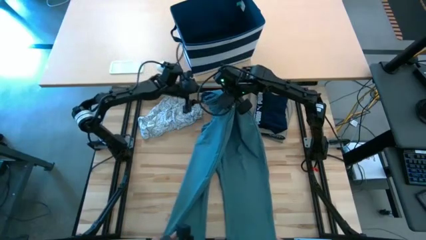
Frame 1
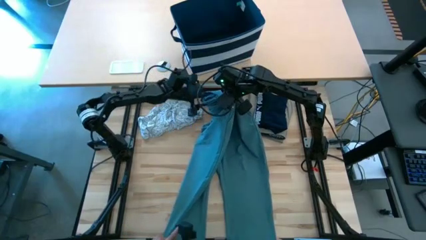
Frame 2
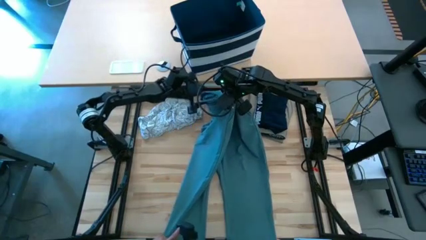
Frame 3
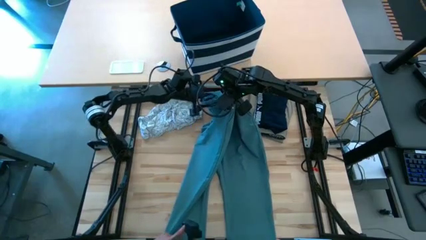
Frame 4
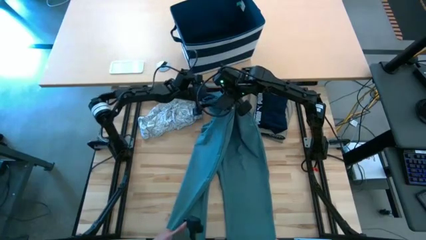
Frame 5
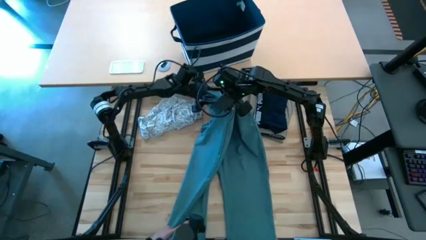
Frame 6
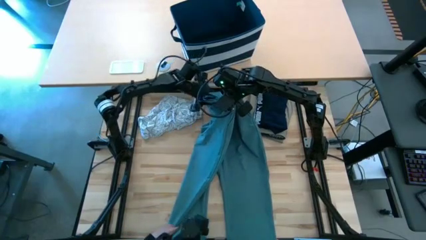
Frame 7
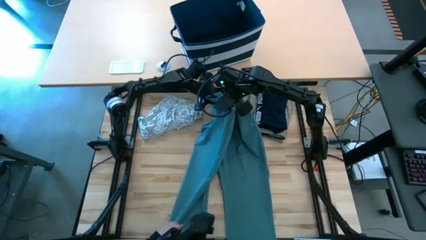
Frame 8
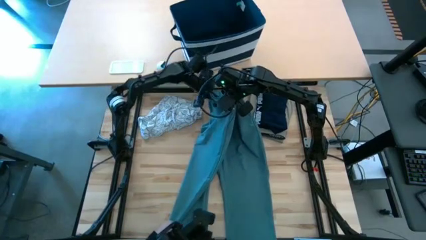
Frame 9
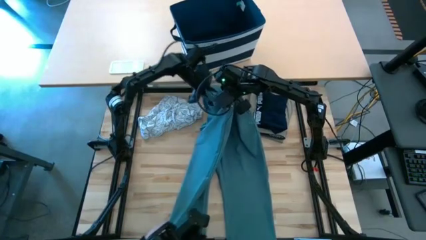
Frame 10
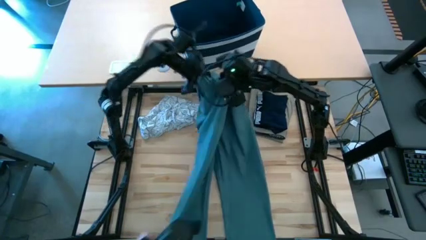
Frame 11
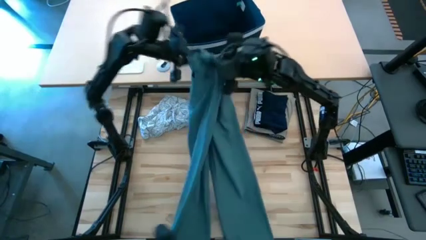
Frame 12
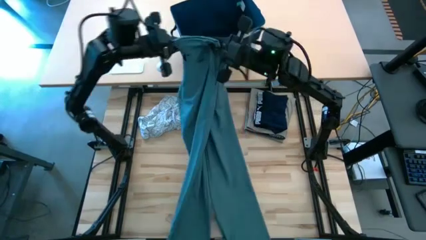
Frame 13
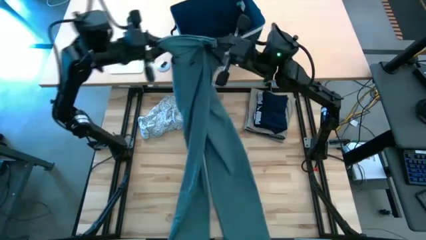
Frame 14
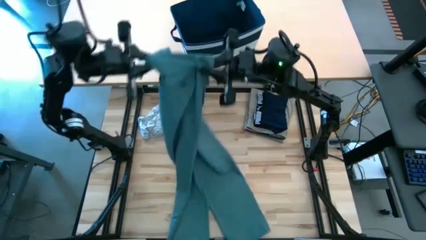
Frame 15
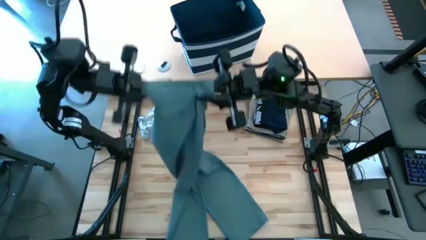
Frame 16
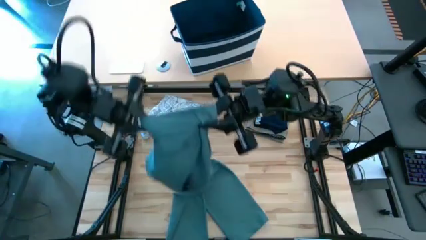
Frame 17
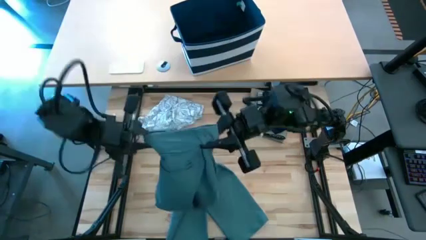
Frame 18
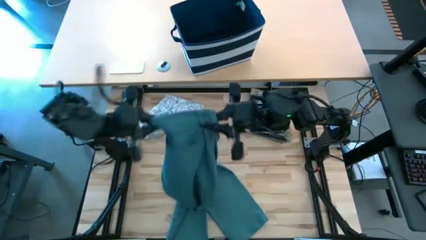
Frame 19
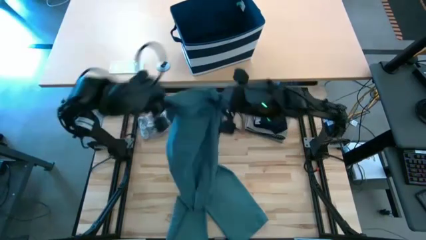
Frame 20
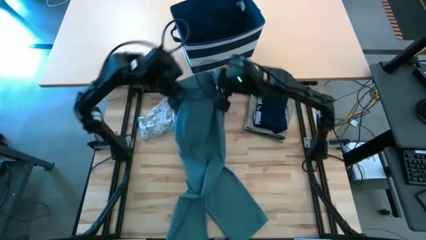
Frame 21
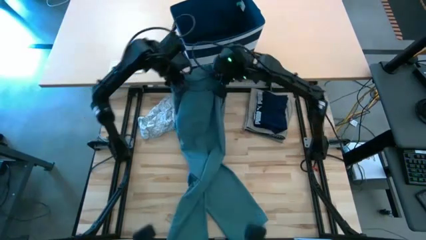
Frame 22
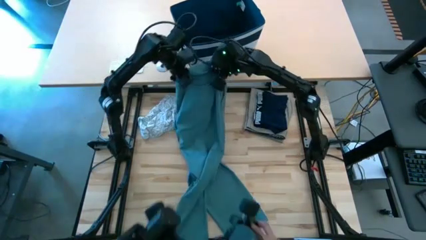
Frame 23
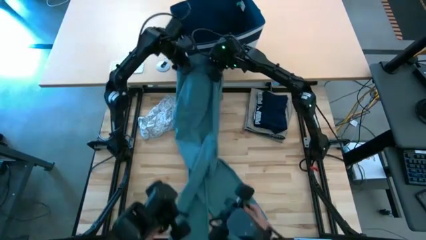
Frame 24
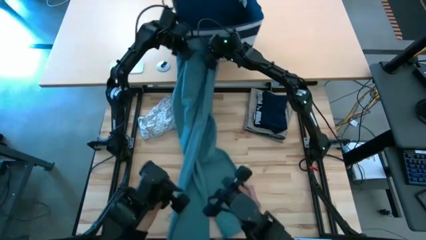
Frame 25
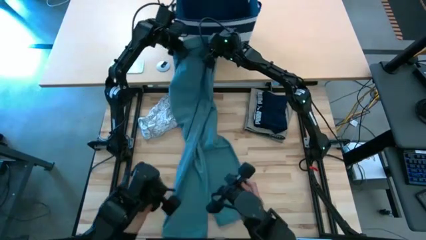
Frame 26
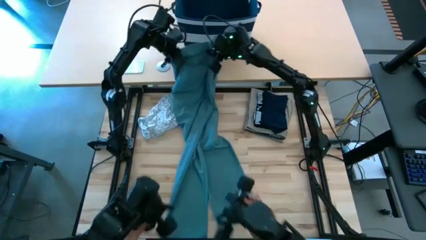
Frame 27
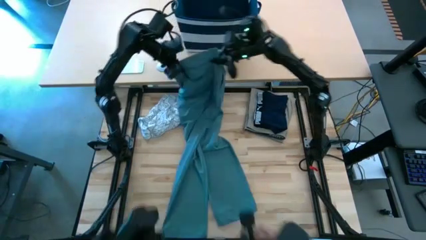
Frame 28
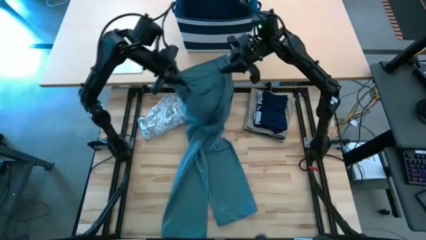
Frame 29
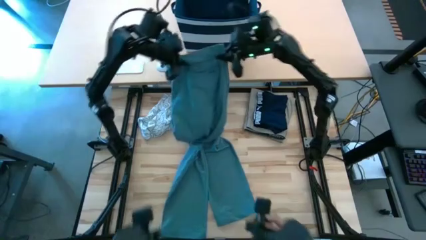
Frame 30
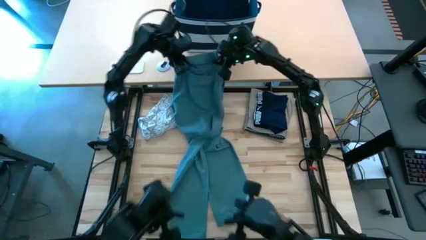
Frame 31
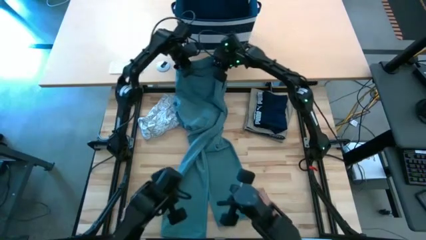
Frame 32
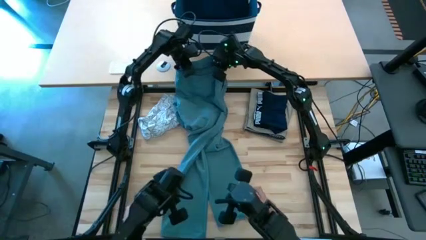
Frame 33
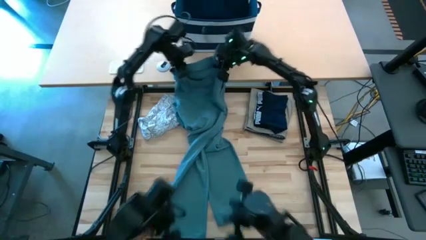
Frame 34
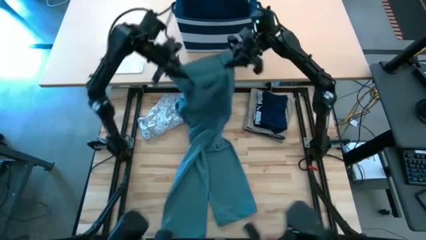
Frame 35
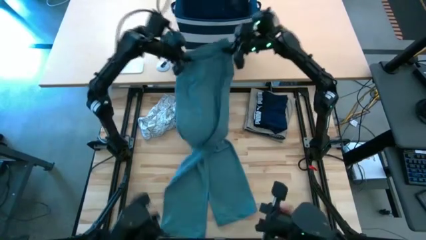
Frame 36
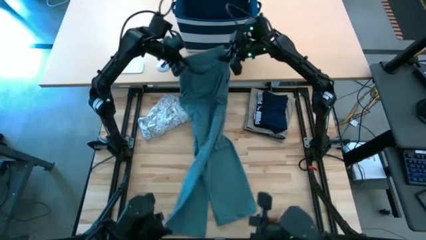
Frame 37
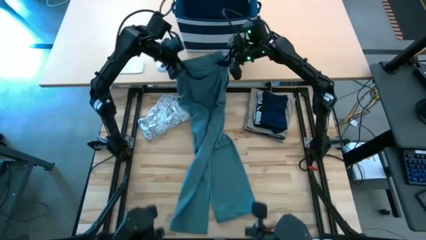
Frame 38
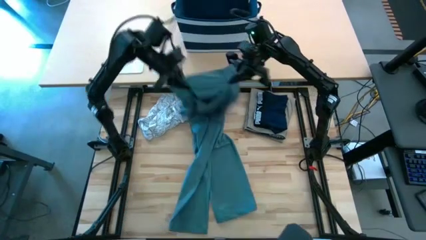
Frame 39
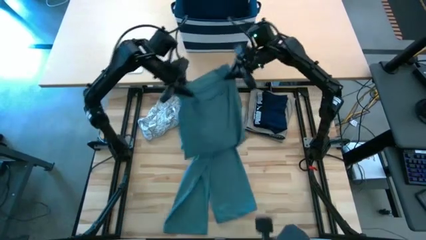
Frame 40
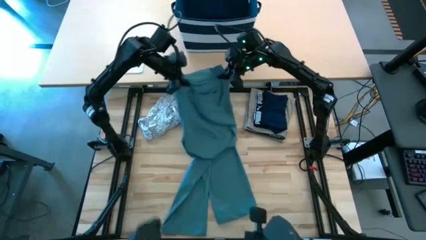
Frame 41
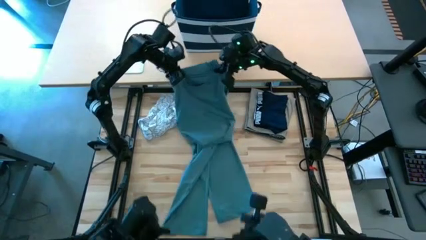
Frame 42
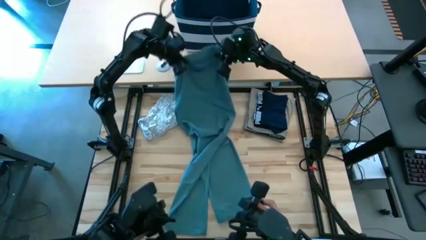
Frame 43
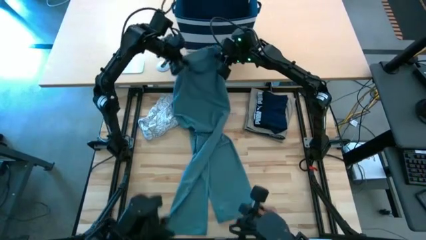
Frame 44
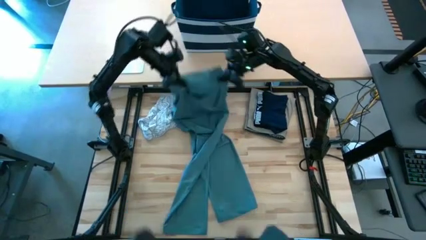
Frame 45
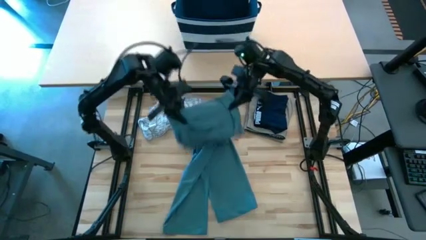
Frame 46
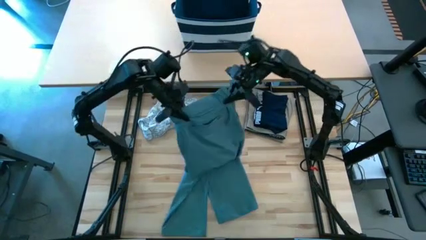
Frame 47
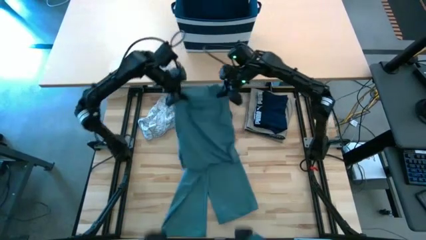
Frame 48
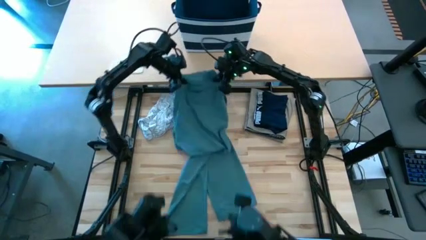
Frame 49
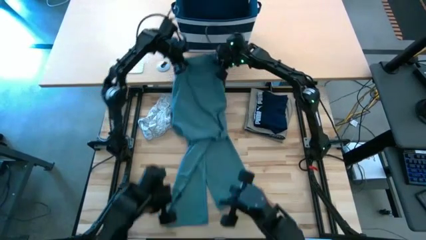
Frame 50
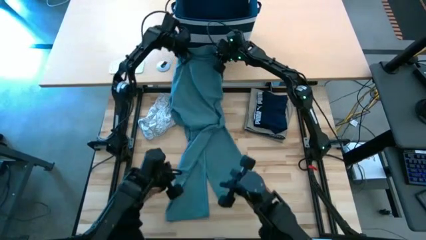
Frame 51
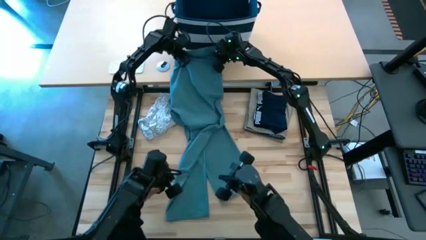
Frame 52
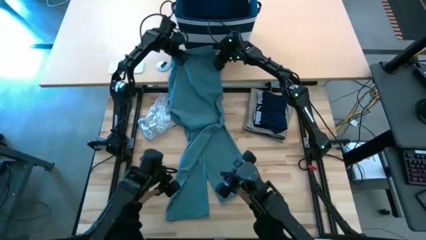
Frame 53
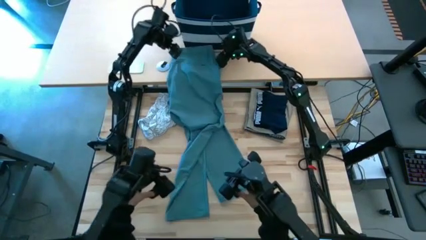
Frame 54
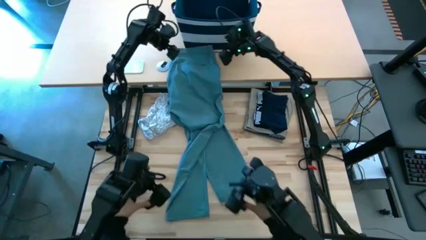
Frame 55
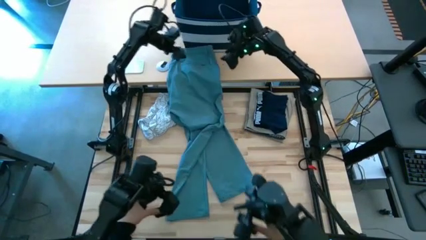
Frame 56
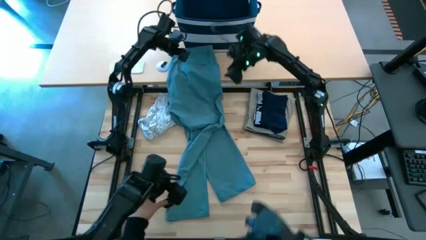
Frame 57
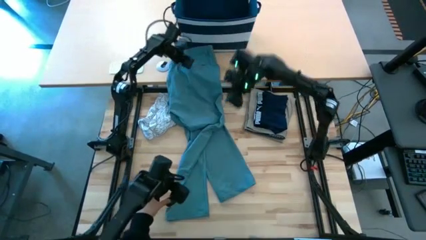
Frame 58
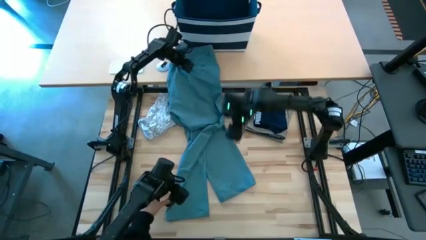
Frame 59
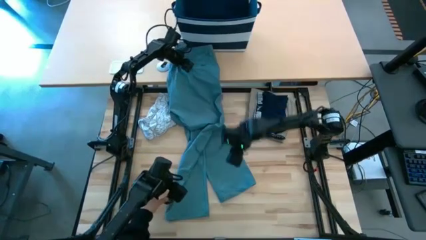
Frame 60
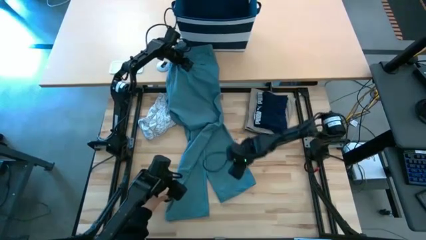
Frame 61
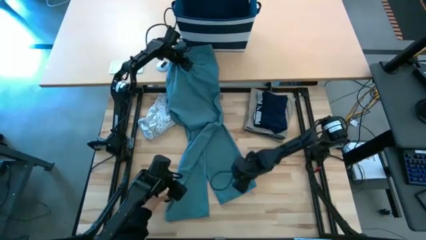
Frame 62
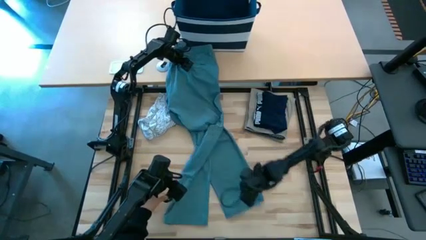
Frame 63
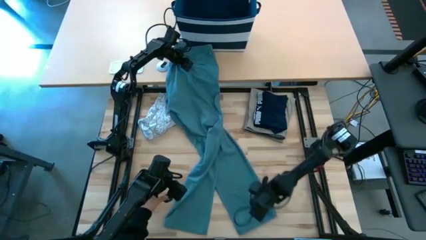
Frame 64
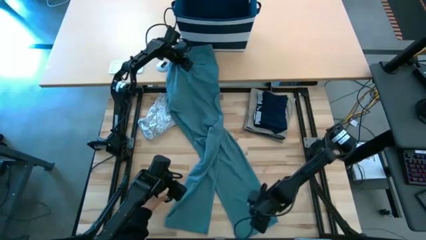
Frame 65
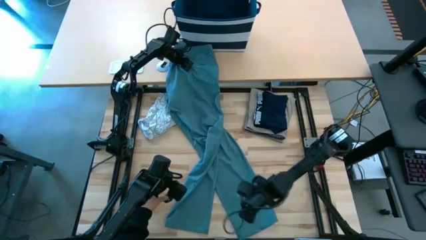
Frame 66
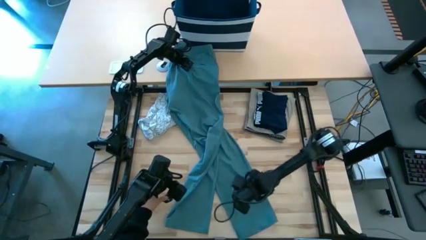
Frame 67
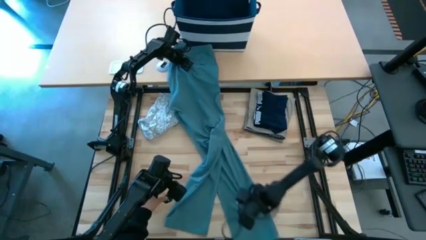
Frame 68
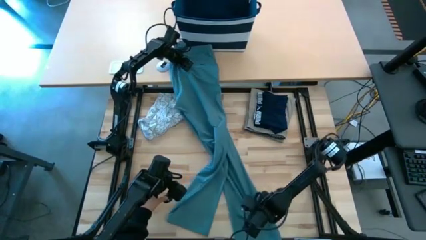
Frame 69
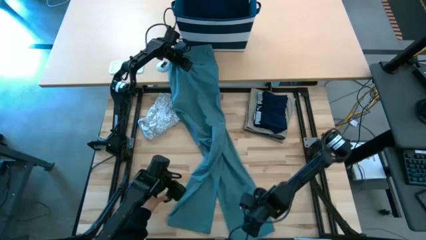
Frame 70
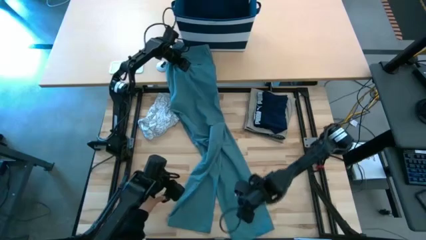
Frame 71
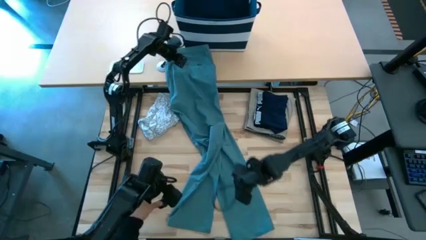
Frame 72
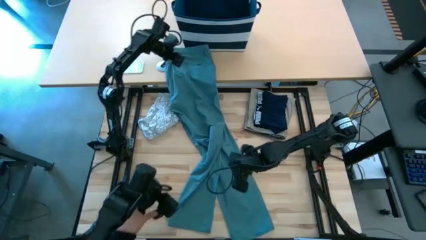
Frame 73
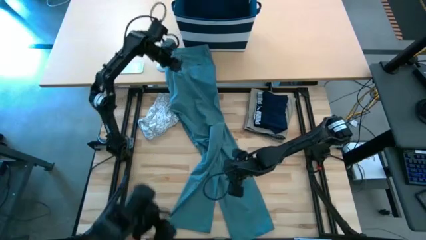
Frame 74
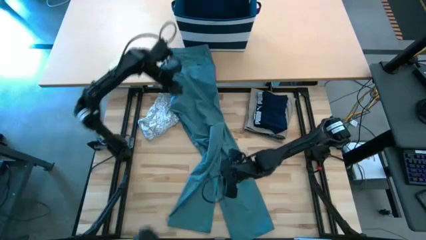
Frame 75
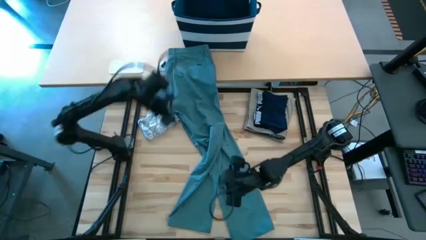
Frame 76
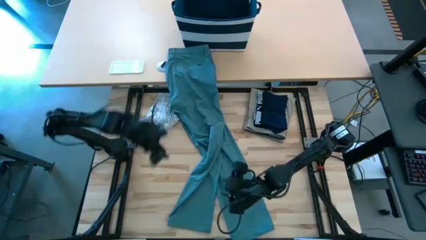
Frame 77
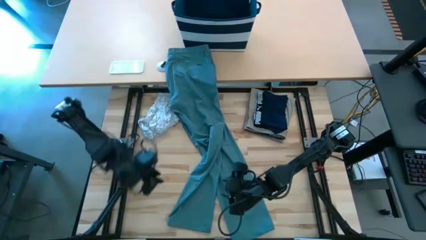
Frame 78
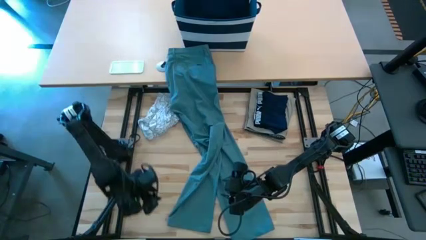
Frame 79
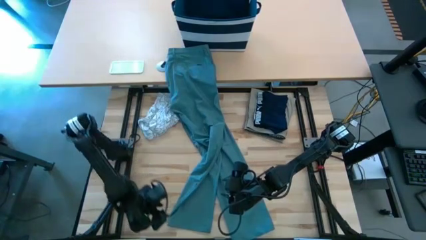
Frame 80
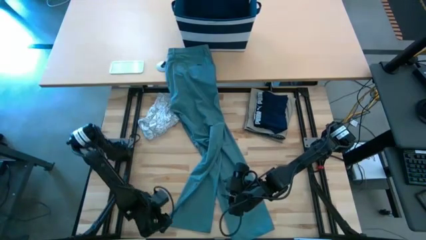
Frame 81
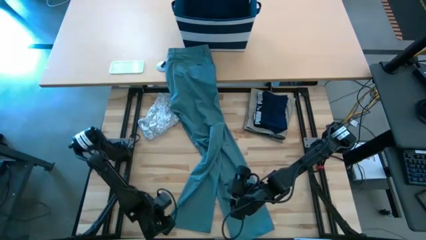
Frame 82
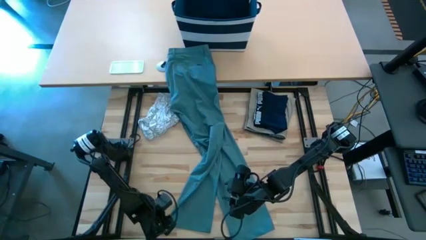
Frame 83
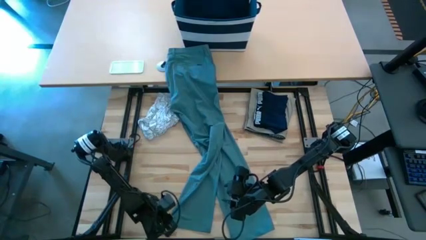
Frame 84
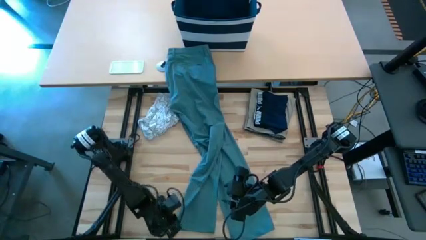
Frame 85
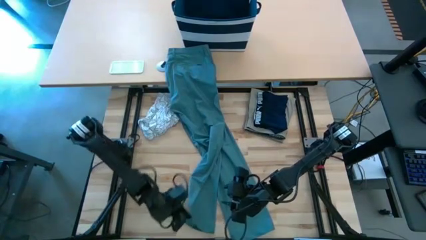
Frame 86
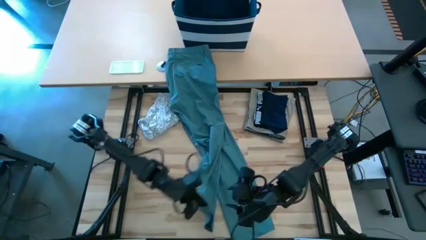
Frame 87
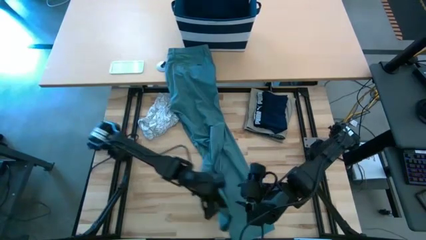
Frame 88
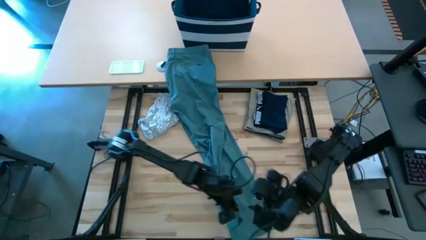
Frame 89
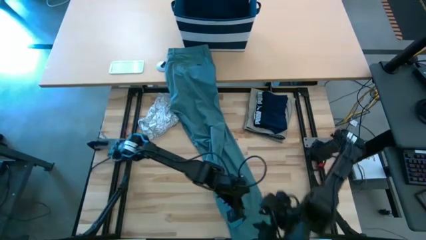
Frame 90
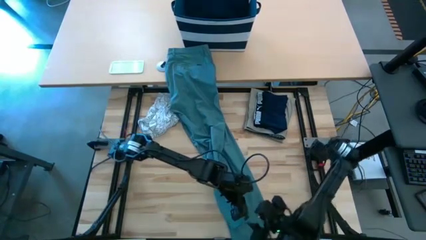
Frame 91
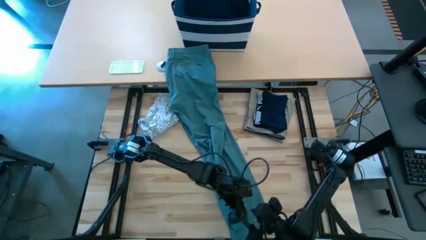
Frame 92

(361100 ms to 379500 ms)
Task: Fold Laundry from Bin
Fold the blue pants
